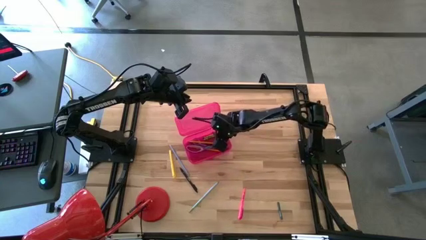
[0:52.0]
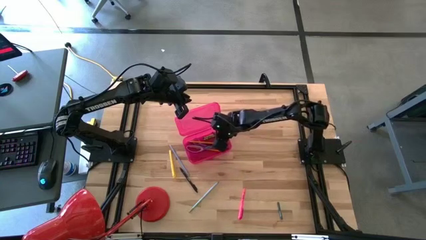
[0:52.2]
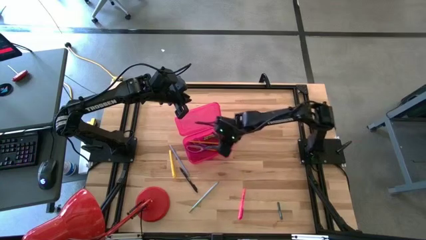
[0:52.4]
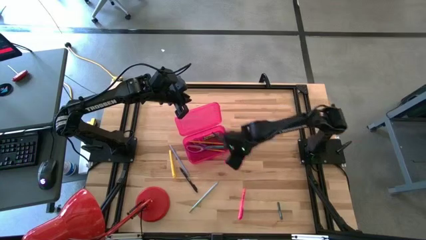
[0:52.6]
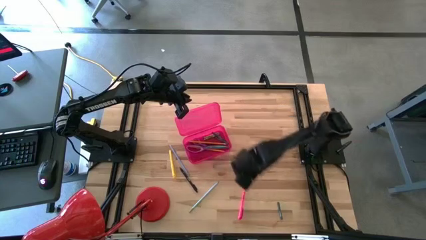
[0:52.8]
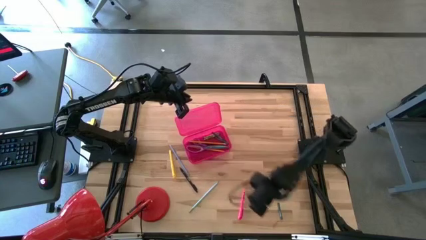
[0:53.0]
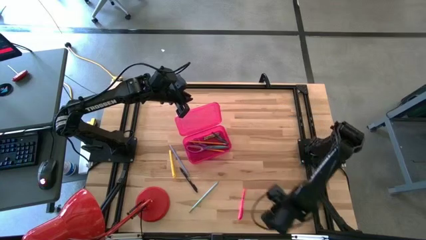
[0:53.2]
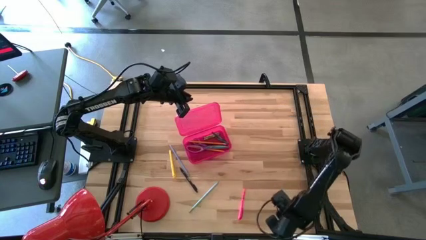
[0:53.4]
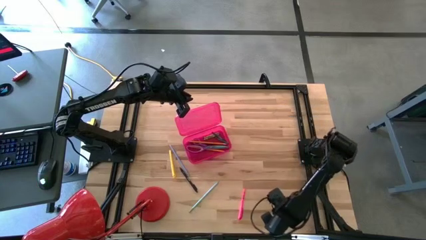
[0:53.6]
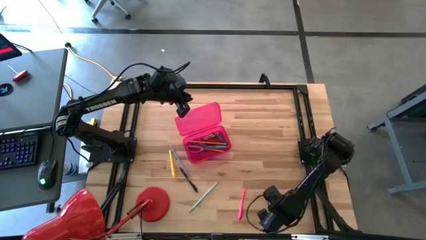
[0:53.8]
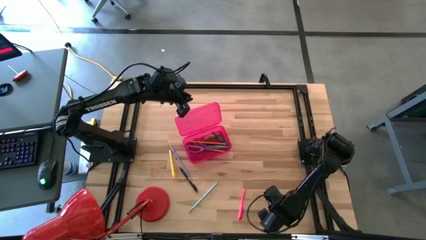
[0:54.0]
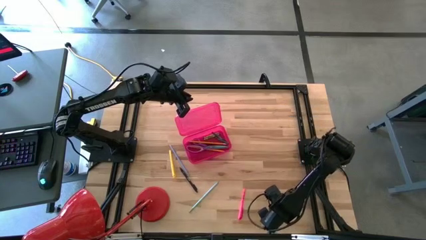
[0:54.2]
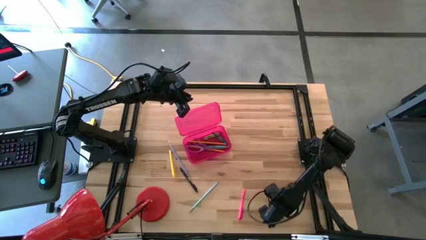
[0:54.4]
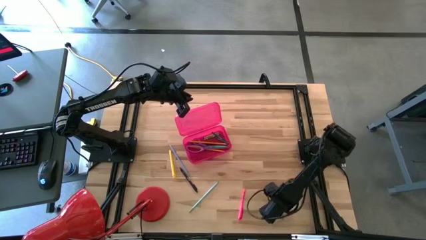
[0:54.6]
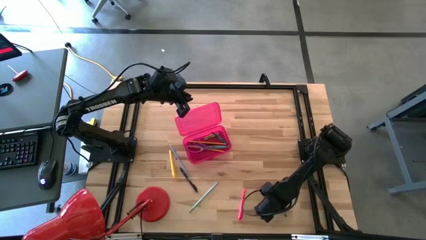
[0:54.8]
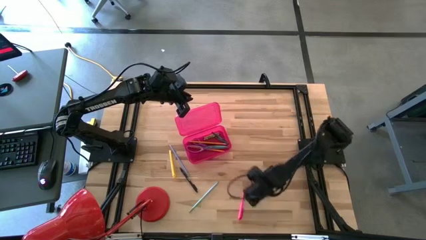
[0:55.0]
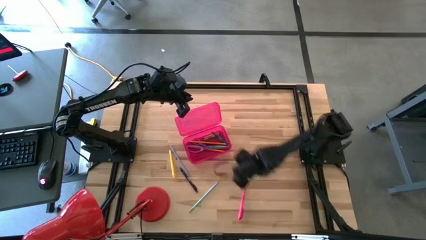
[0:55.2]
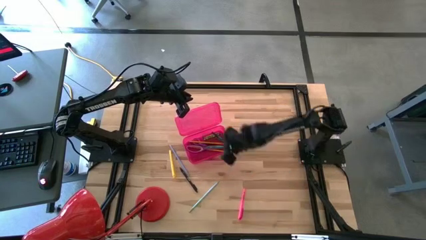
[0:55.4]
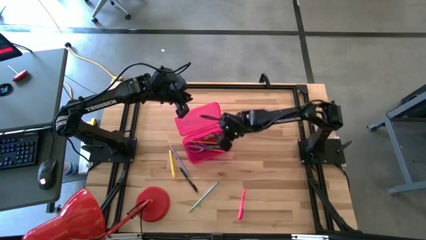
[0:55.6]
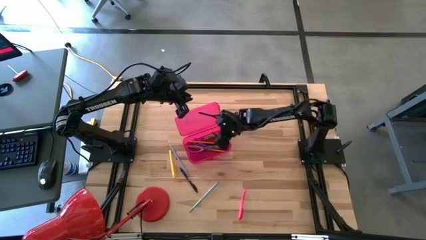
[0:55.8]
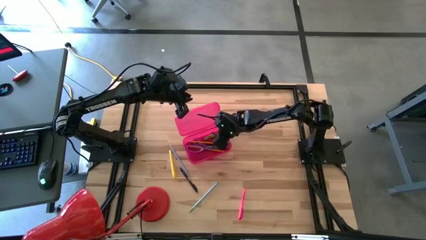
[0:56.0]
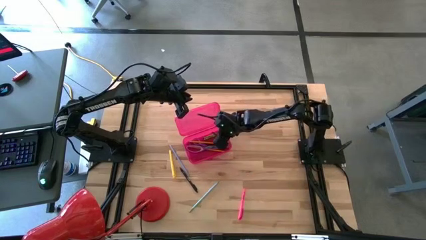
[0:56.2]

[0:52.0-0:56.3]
Task: Pick & place school supplies into a supply box
Put the dark green crayon into the pink supply box

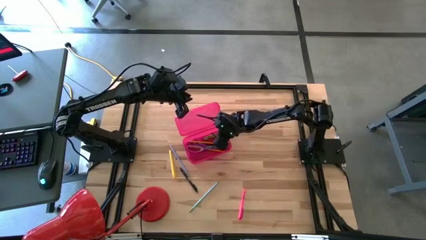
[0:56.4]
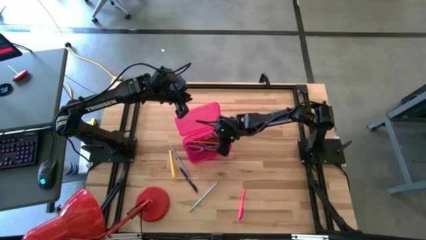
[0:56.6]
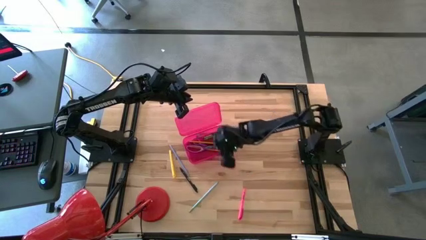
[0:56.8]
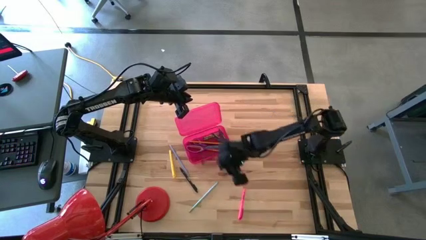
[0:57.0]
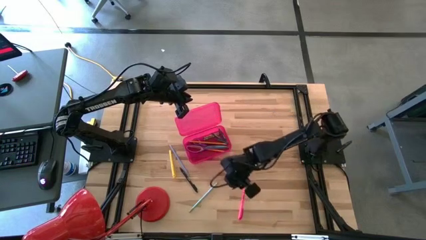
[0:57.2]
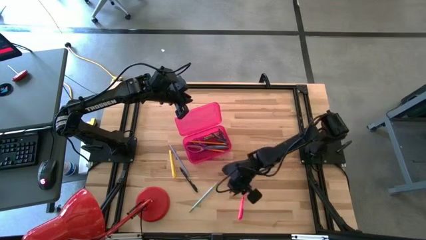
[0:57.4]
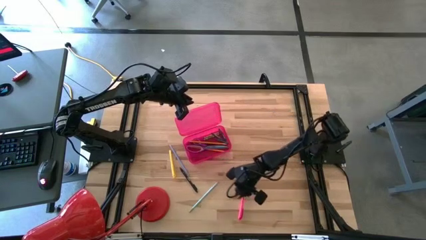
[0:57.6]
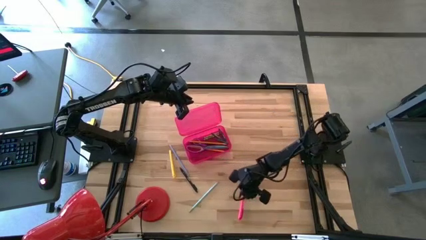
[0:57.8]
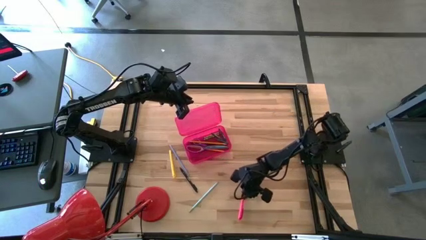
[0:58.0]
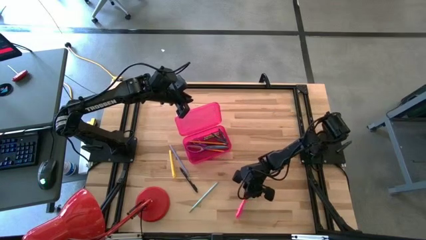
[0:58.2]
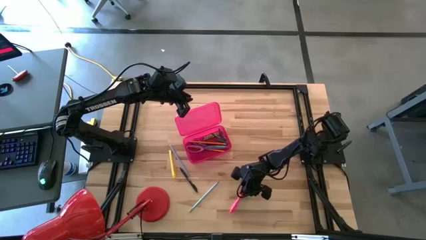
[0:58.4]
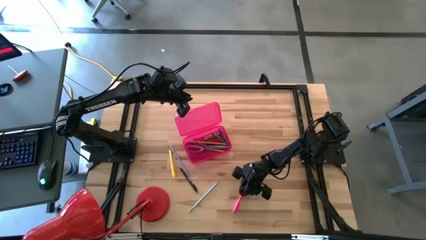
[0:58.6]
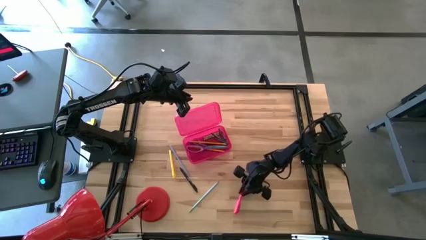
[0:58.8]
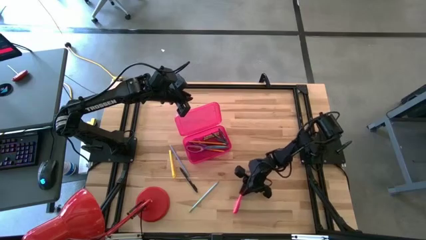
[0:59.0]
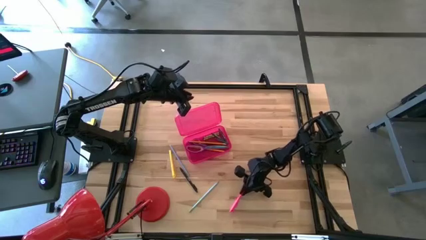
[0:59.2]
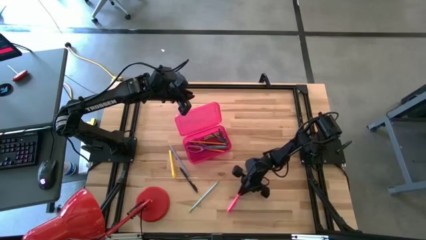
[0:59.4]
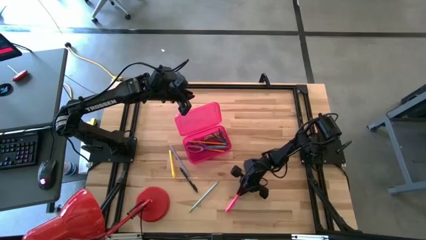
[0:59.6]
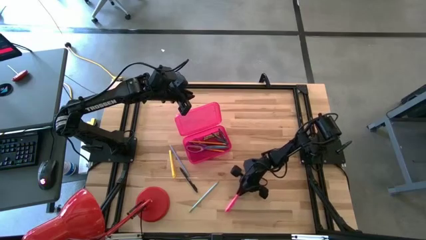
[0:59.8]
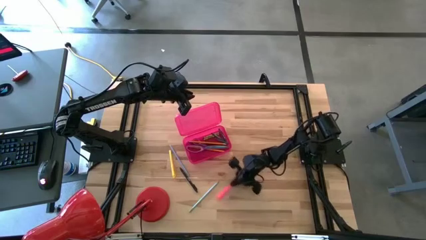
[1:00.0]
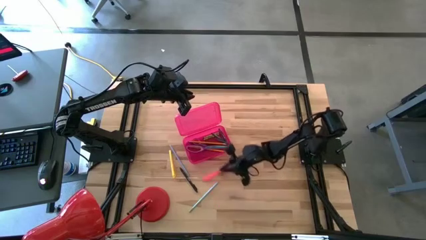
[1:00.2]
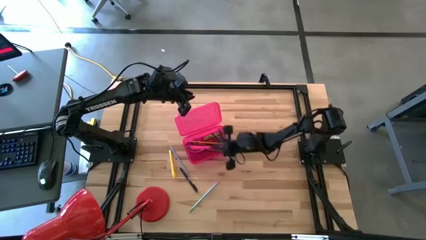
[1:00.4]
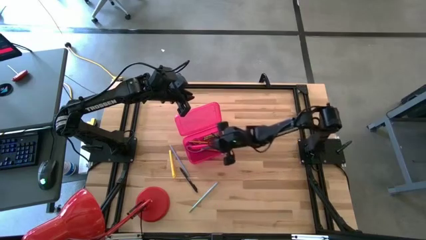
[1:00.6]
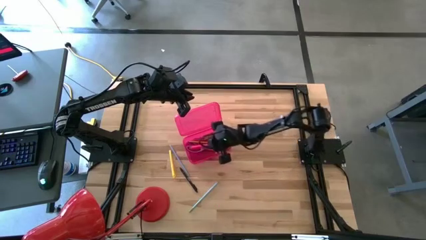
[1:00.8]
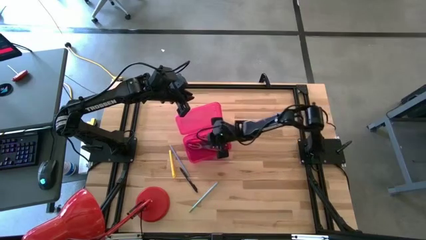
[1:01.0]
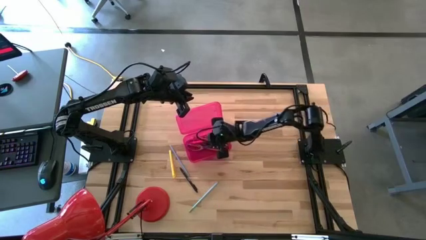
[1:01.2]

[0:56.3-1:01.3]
Put the pink pen into the pink supply box

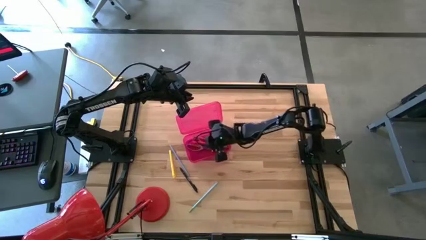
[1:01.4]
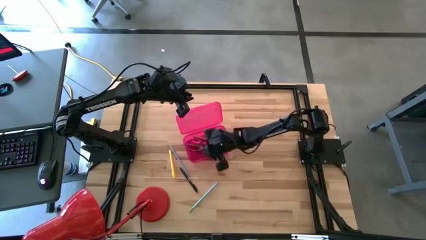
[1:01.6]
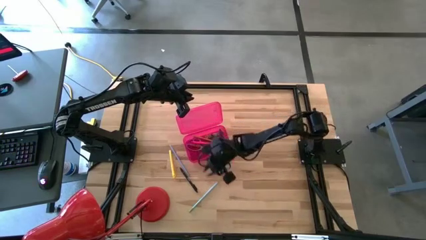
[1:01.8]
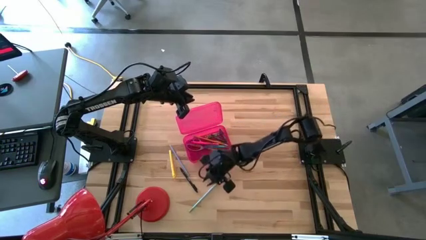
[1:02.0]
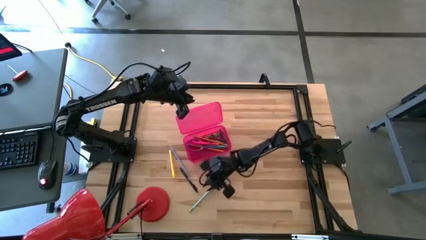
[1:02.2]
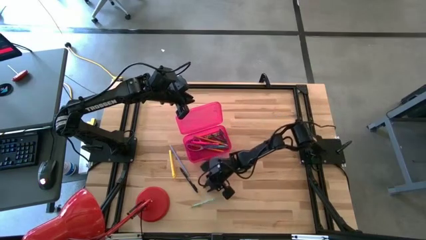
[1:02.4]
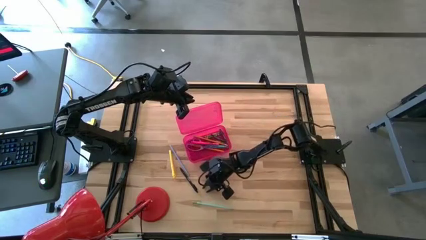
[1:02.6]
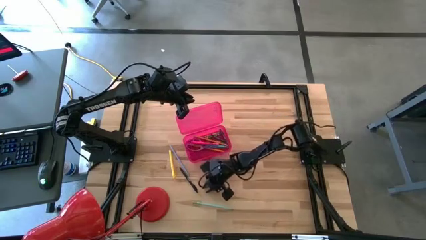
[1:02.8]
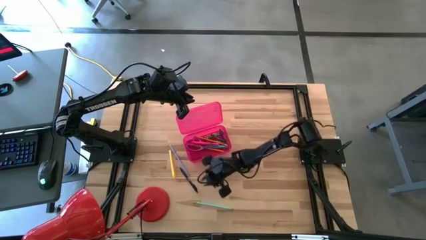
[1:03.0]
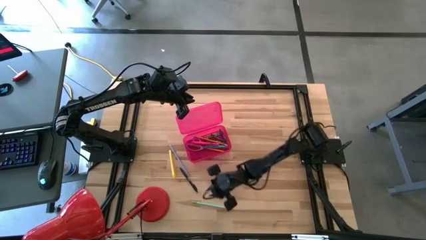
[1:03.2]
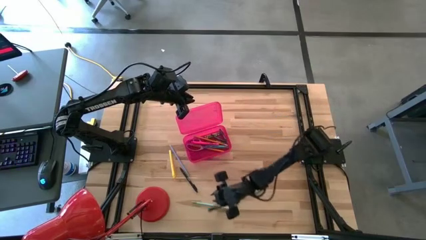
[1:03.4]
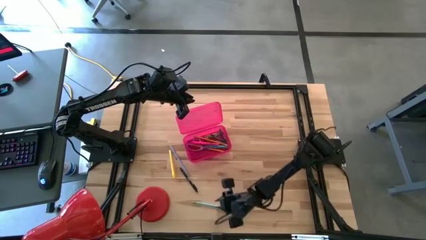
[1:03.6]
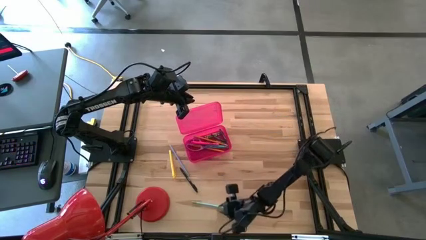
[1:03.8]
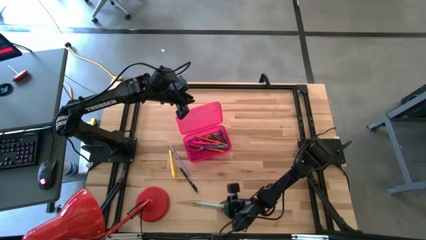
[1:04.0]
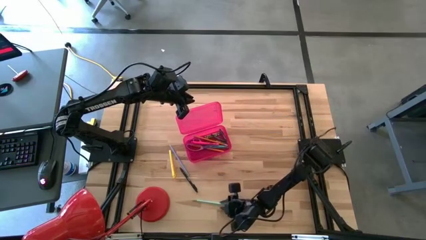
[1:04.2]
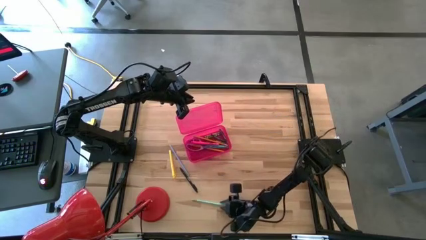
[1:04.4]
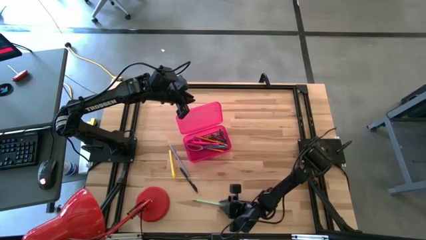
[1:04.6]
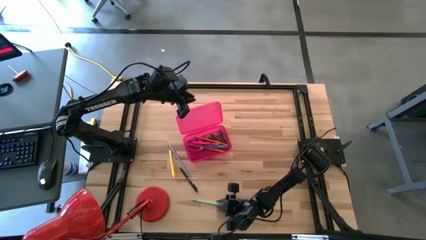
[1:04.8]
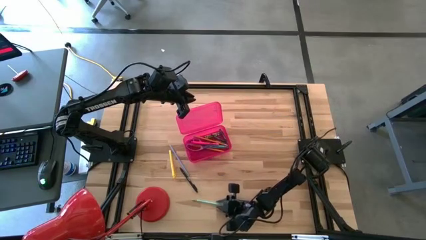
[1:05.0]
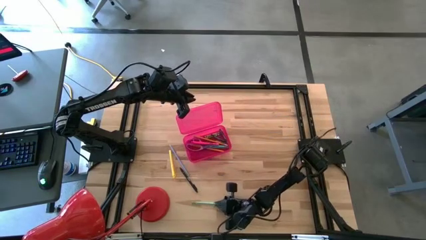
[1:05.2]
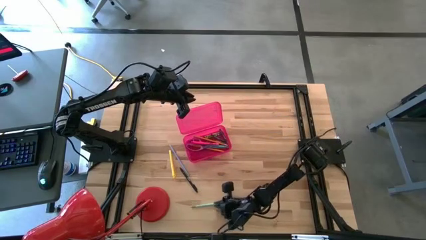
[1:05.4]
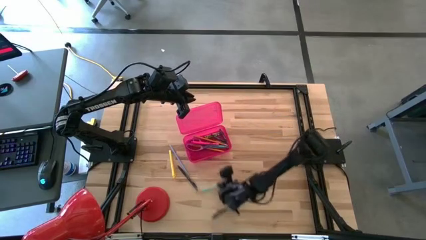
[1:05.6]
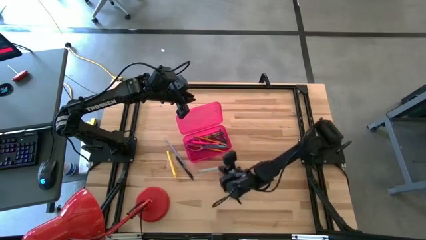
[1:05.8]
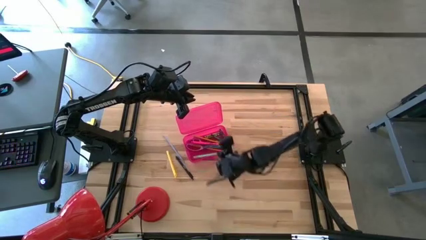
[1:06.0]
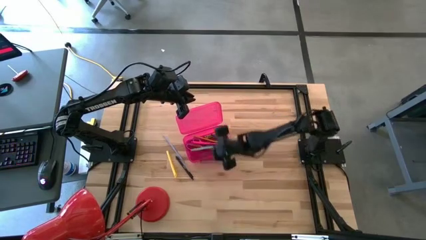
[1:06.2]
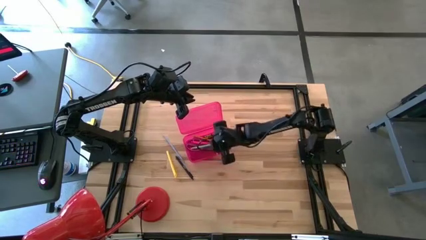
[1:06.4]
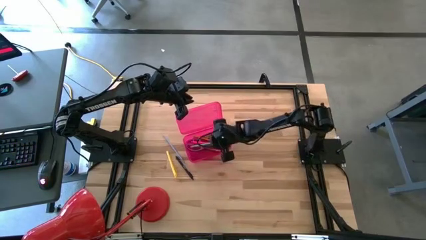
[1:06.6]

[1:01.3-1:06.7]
Put the bottom blue pencil into the pink supply box

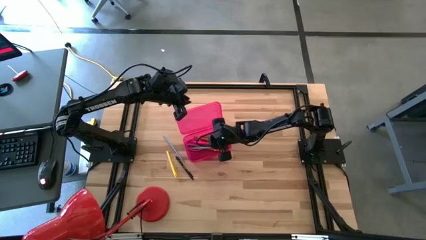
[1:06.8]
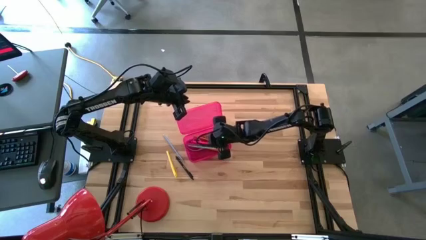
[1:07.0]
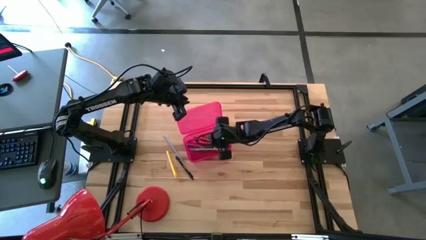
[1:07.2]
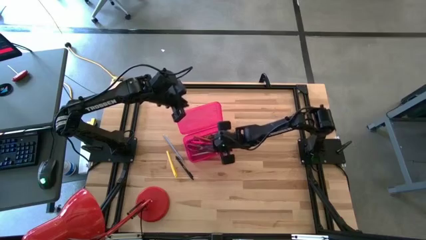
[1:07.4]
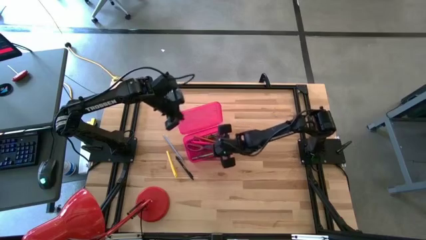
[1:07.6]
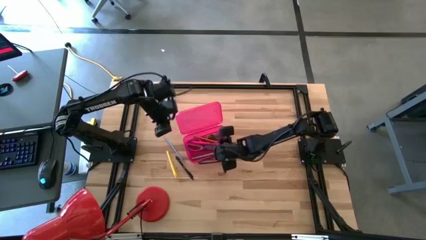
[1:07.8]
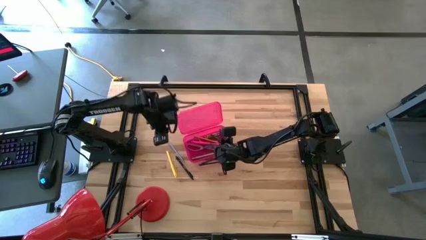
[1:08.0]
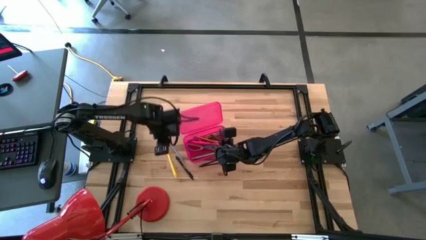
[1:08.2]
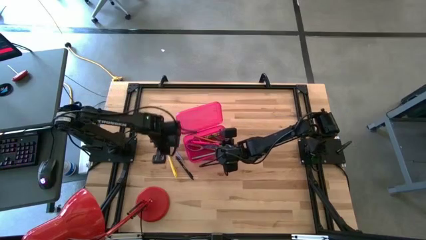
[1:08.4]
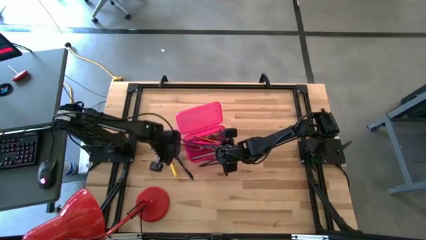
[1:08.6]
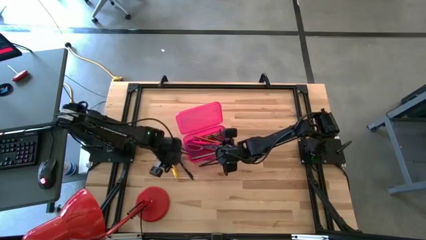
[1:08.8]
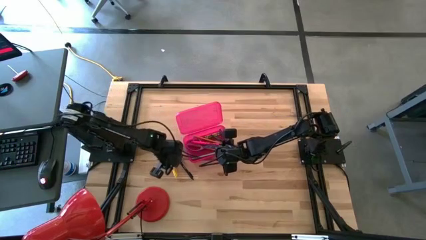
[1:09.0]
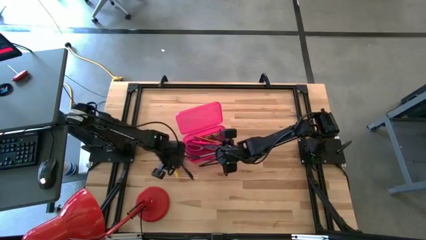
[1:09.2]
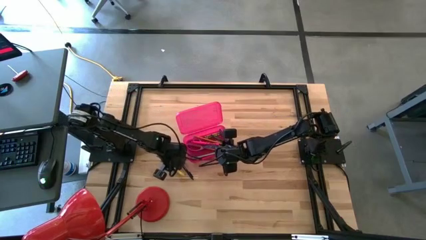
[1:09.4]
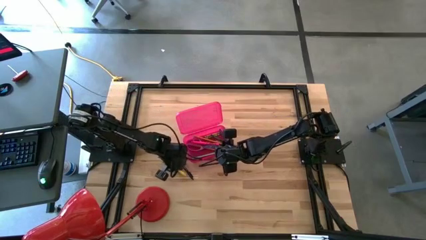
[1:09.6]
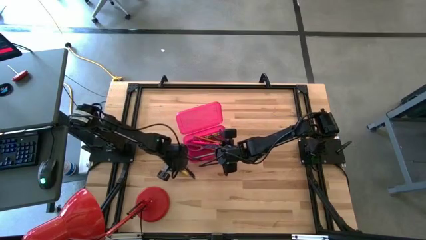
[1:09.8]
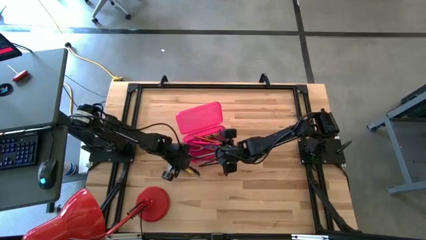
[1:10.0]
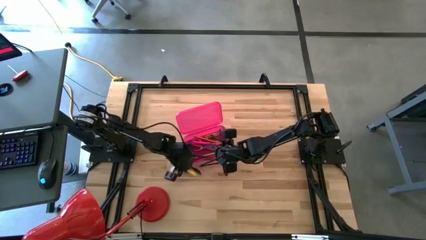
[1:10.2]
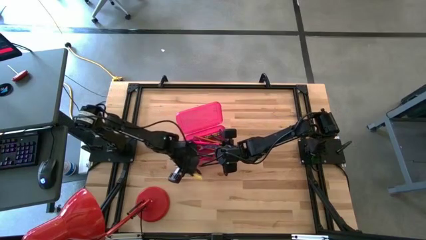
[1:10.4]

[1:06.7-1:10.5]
Put the yellow pen into the supply box
